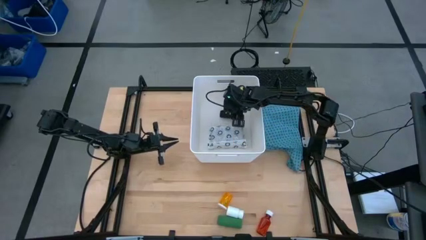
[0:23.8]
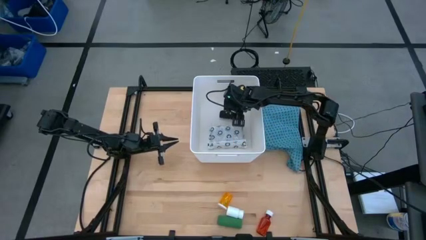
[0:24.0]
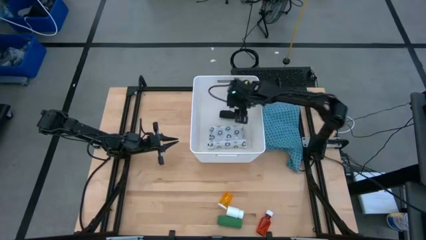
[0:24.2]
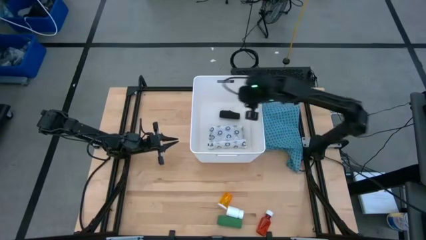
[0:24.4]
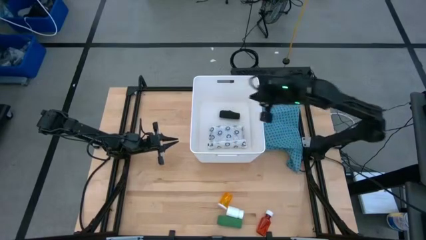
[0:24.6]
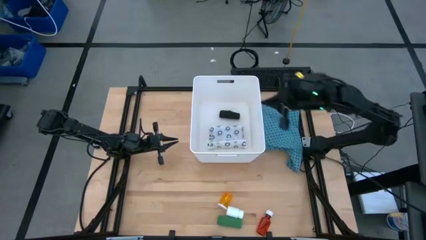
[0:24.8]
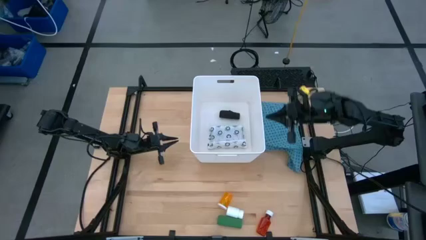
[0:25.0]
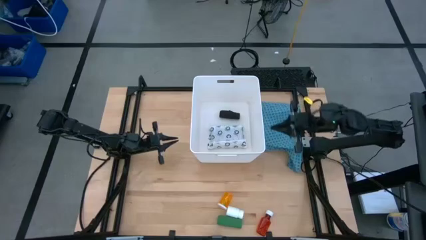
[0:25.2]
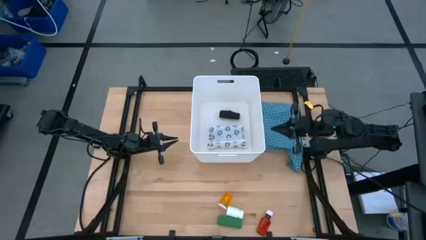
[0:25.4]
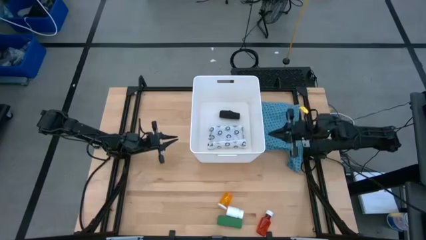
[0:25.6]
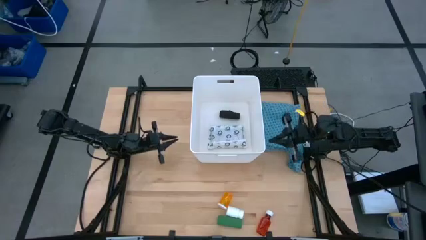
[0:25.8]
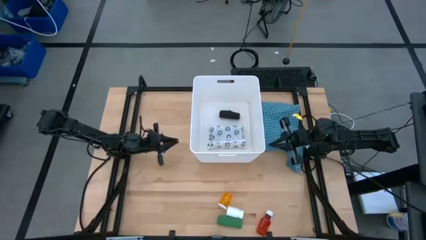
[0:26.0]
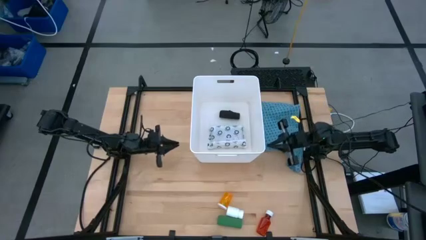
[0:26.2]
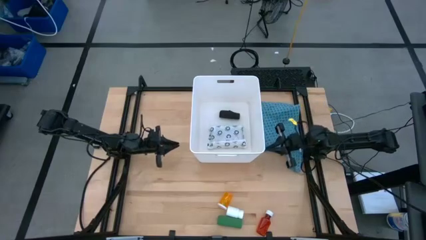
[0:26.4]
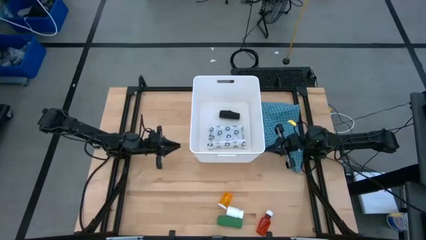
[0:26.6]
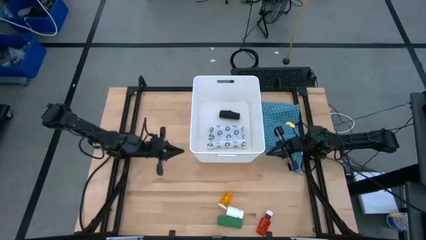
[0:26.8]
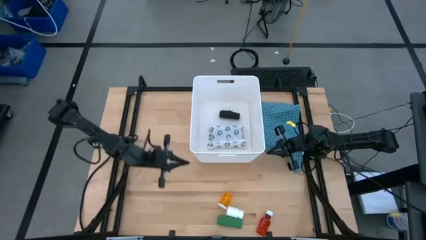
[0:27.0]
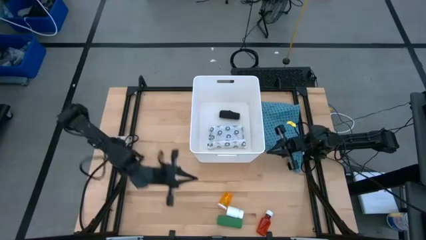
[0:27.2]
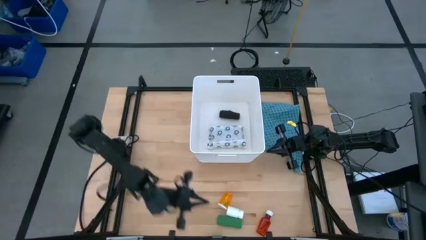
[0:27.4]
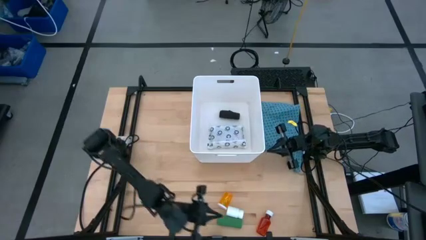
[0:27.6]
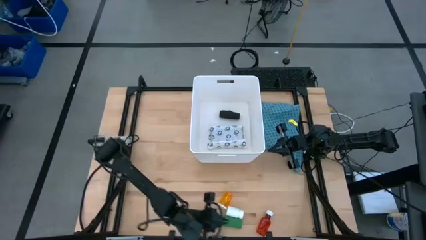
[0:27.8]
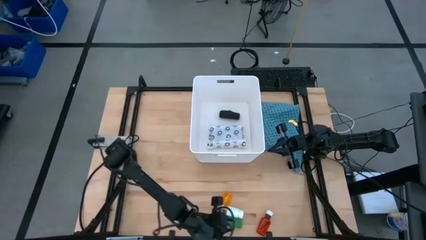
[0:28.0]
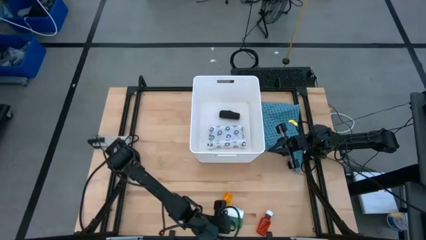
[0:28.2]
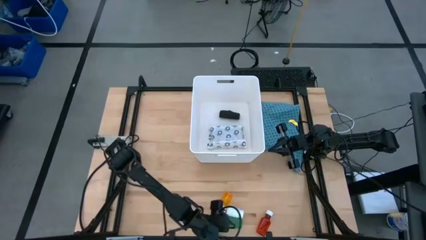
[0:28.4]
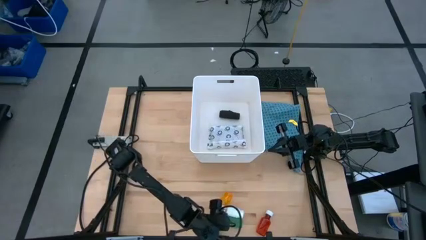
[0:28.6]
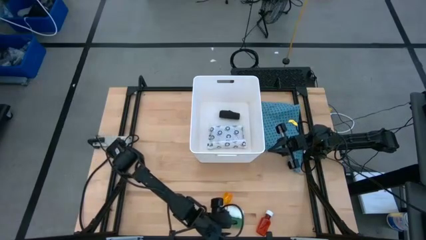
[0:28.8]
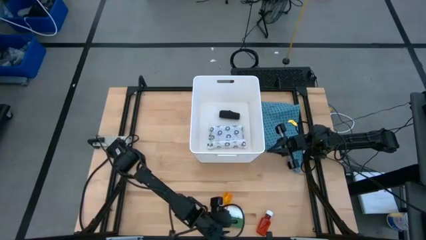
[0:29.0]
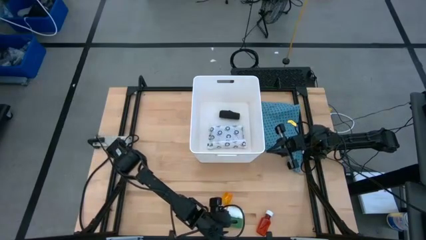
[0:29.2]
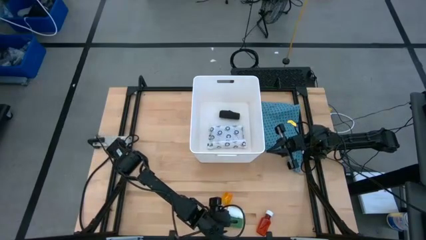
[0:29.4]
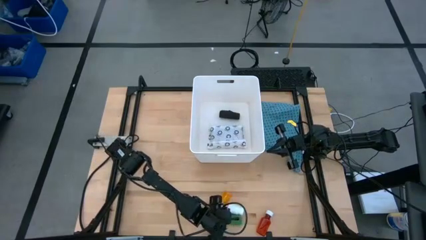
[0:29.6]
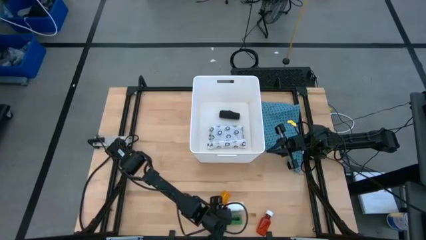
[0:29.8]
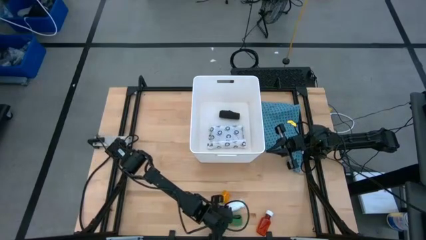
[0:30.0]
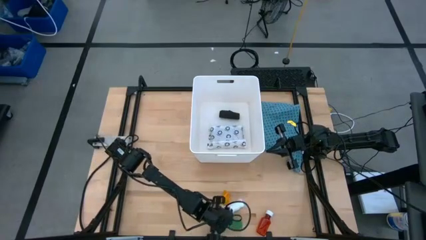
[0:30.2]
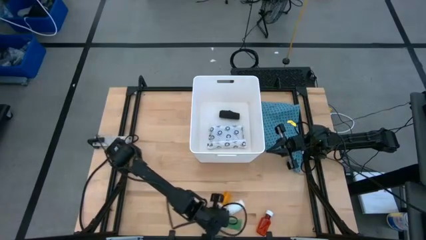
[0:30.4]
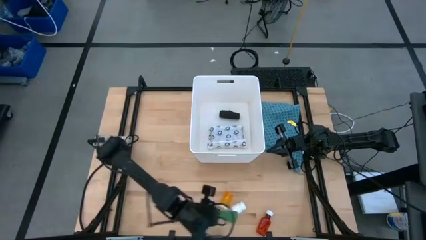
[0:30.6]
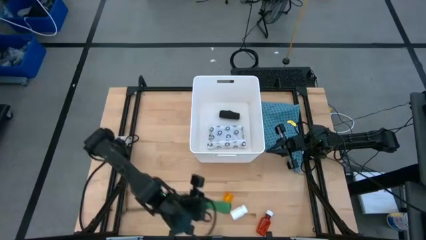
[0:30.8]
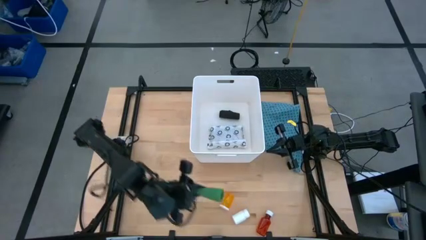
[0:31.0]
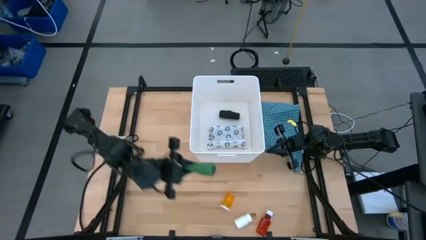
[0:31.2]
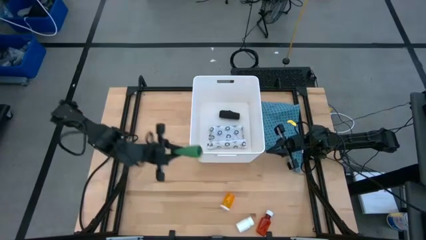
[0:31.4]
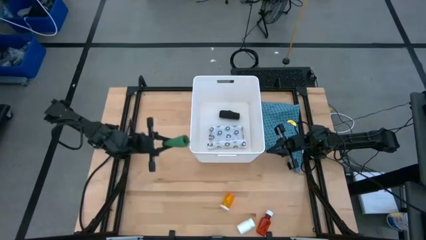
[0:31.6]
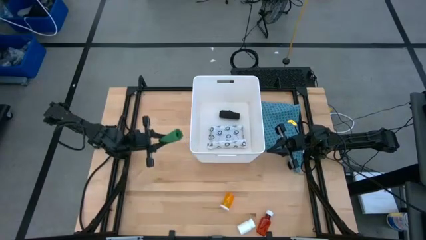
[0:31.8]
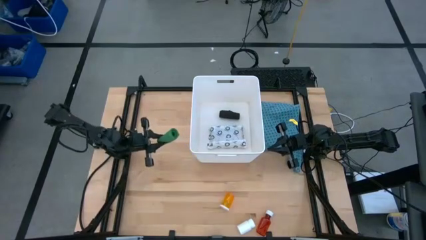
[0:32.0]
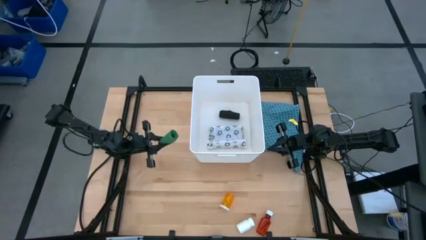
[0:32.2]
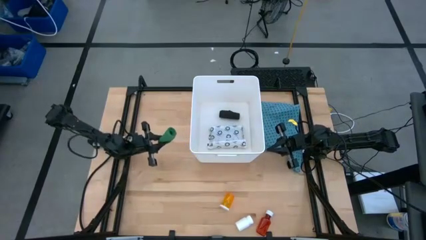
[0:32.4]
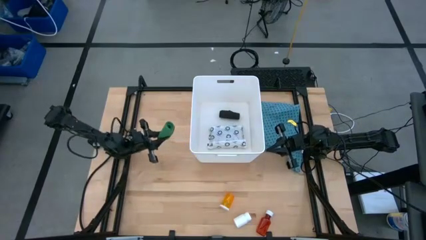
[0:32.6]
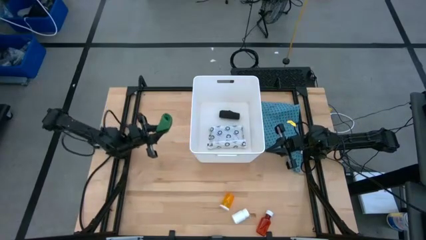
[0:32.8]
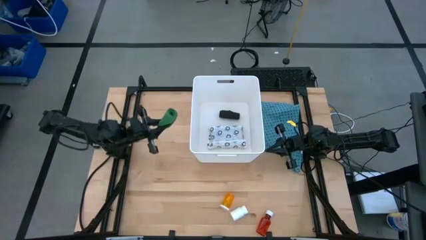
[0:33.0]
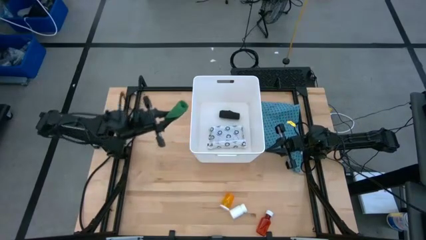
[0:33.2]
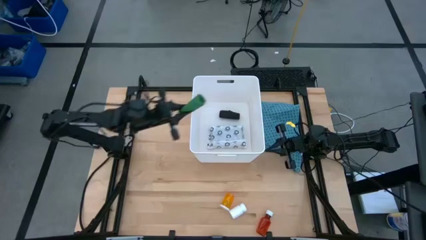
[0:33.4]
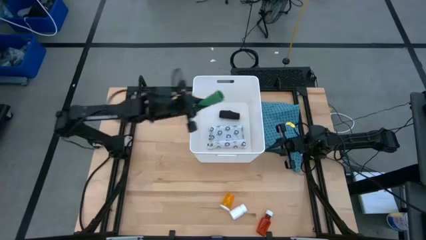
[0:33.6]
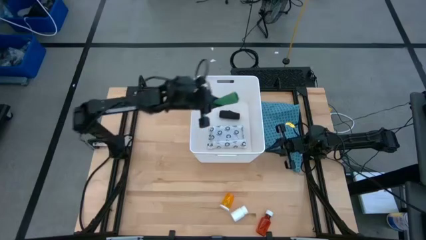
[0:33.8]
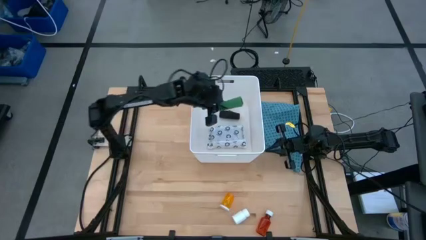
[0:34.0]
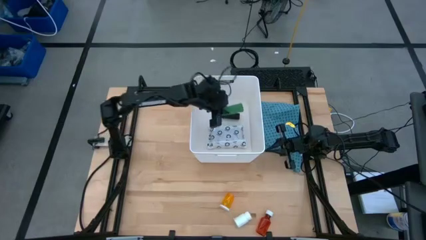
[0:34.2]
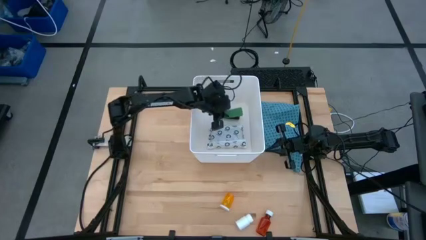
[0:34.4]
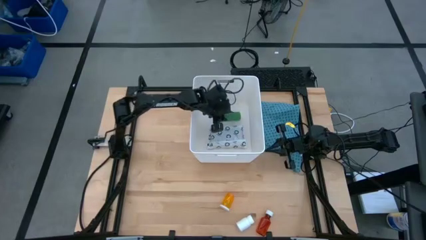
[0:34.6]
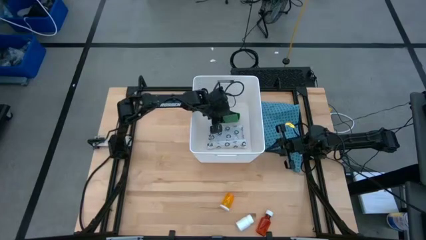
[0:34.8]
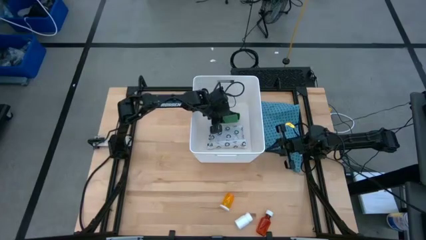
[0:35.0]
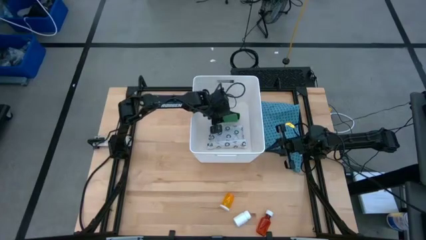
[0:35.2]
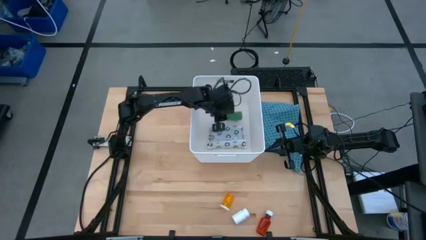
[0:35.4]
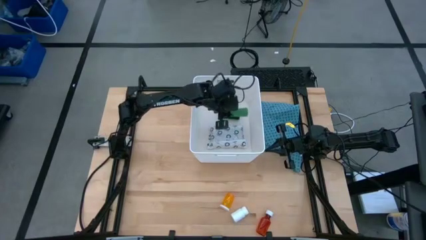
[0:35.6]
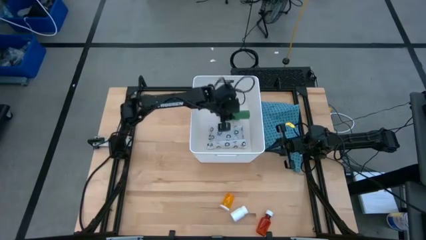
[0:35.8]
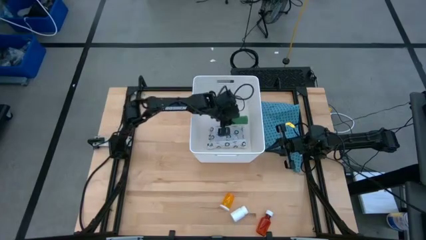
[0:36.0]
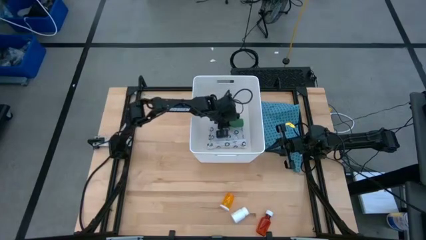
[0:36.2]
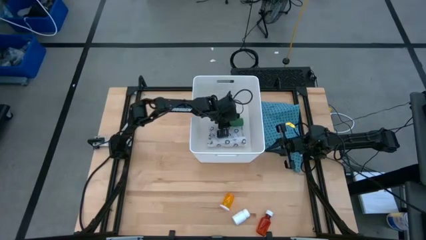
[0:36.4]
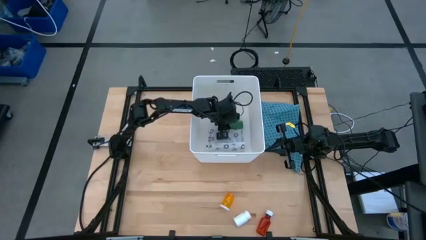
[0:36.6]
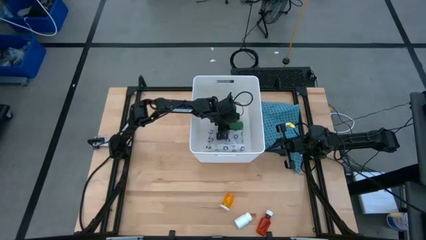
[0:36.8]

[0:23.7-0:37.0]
Task: Pick & place medical supplies in basket/bin
Put the green bandage into the white bin
